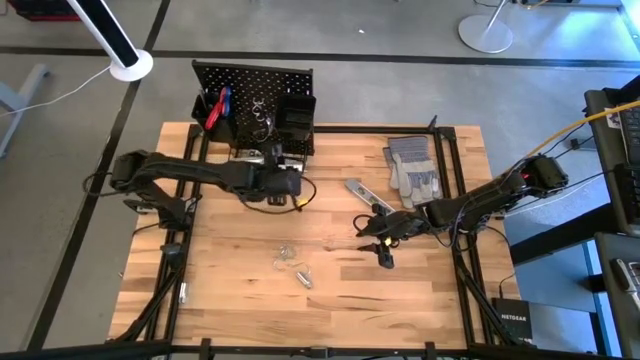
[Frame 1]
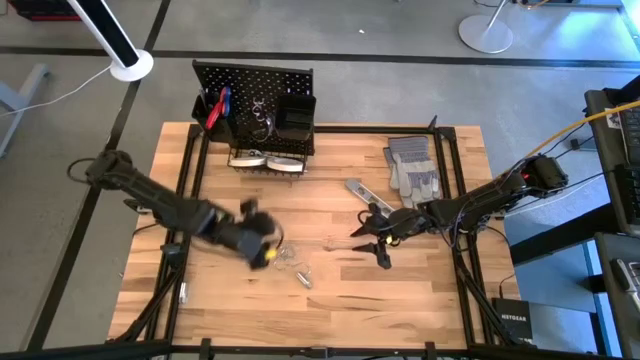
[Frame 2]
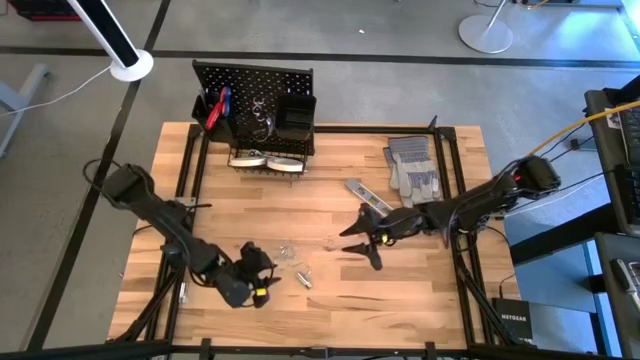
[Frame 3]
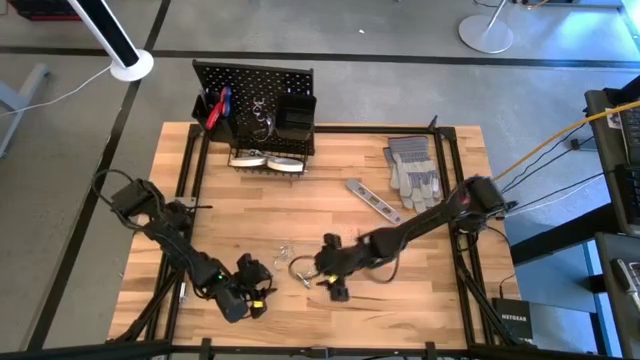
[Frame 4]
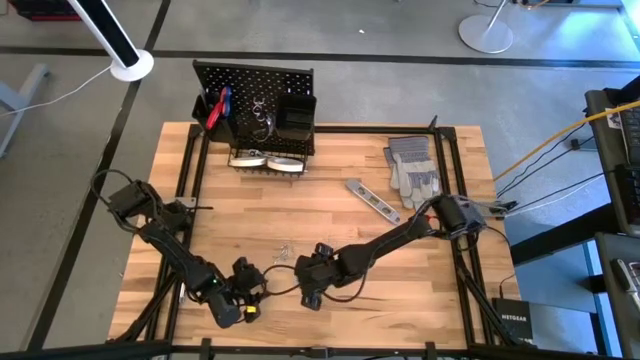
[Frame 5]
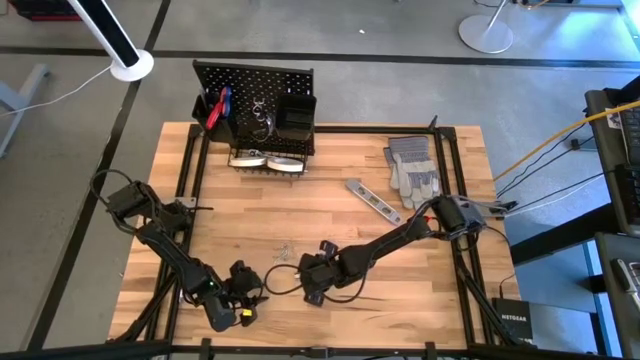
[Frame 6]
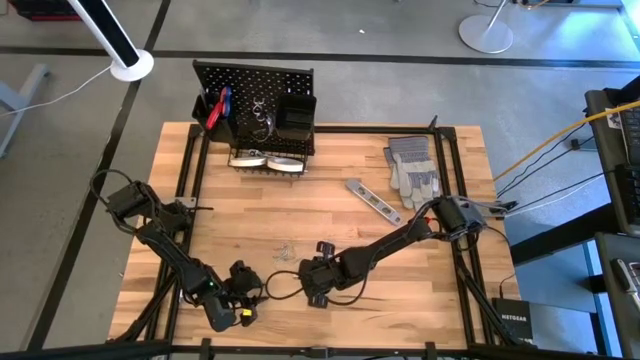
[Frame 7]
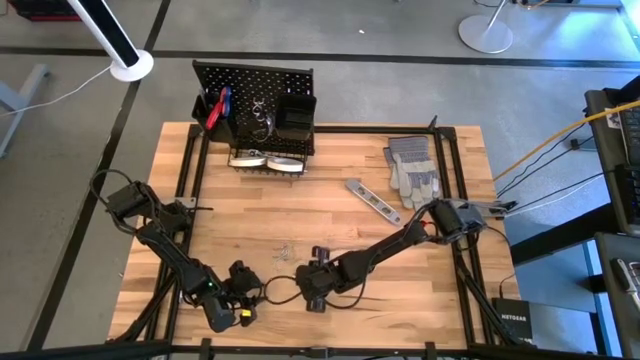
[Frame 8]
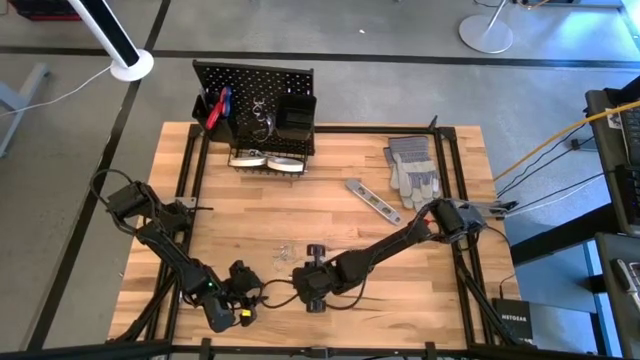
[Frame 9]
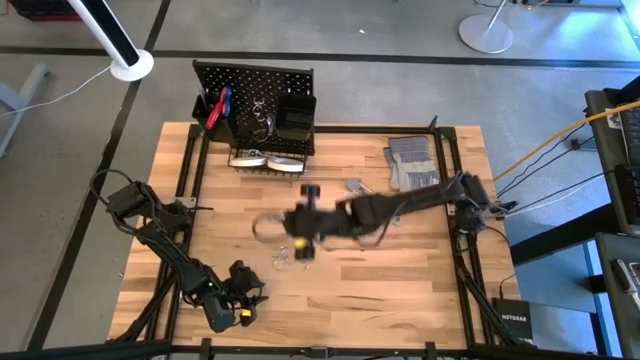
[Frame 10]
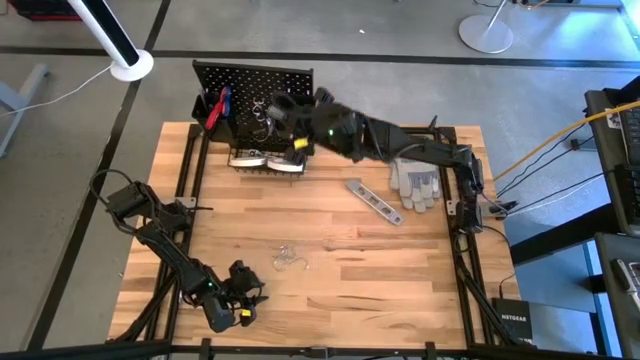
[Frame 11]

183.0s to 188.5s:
Task: Hang tools onto peg board
Put the silver socket into the right black bin on the pegboard

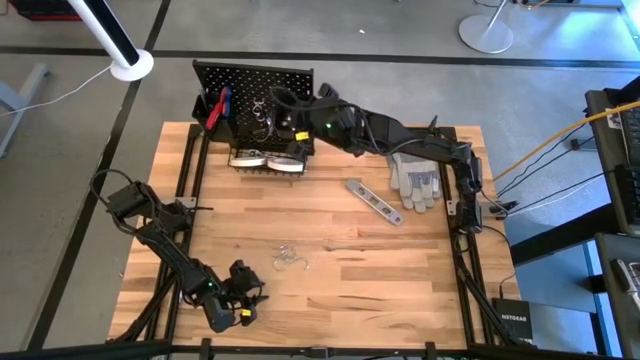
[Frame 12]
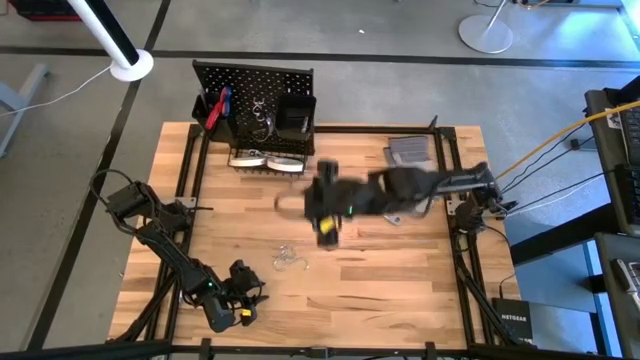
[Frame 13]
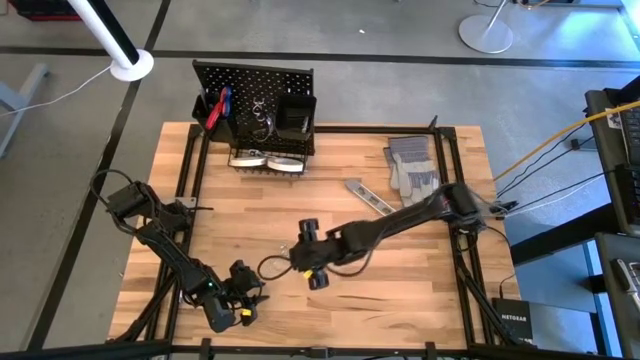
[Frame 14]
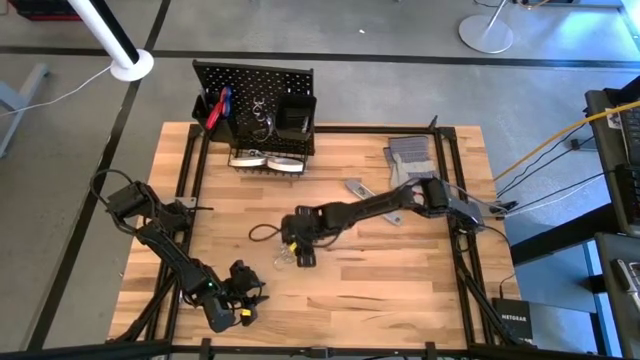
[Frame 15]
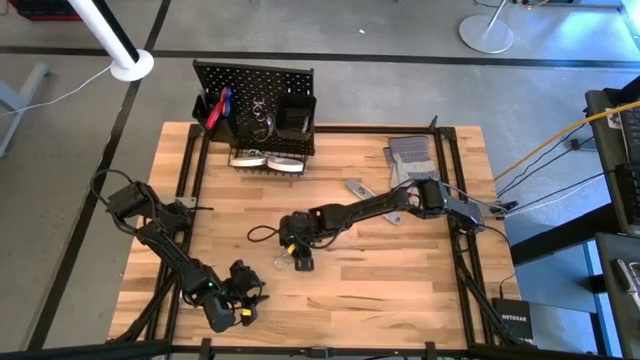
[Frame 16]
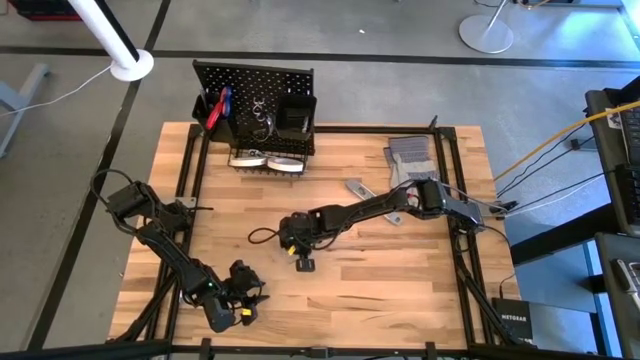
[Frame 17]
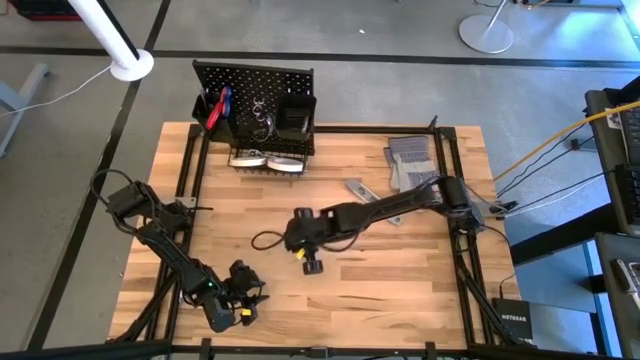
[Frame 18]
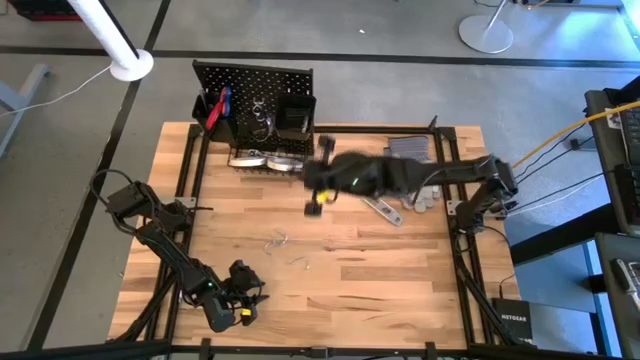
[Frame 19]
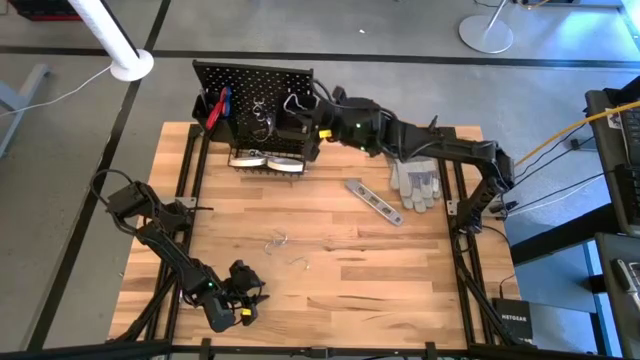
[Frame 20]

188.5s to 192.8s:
Put the silver binder clip into the right black bin on the pegboard

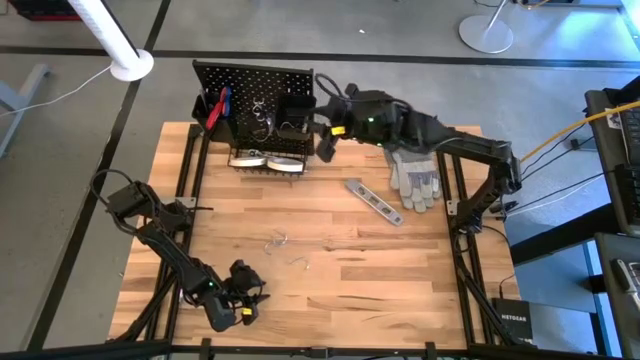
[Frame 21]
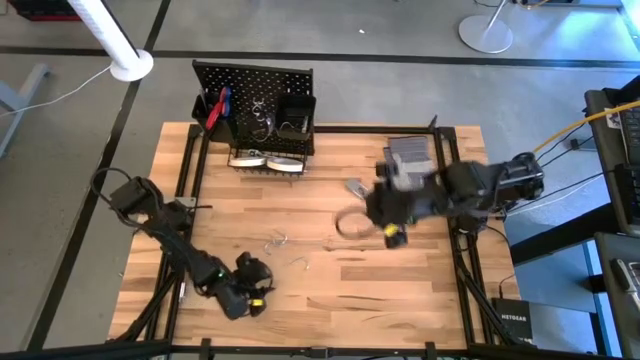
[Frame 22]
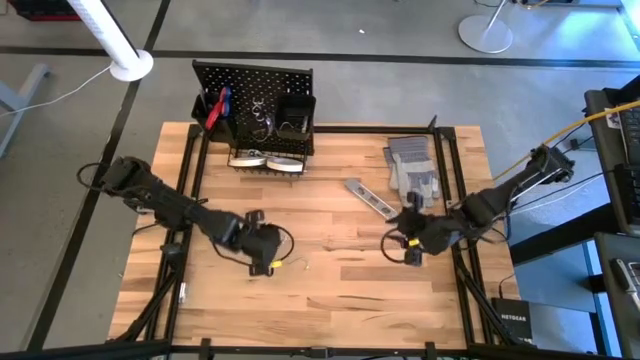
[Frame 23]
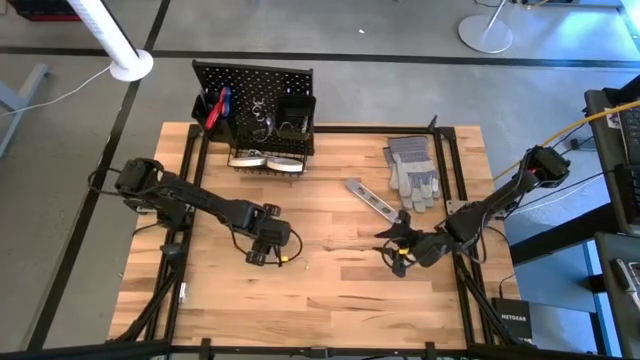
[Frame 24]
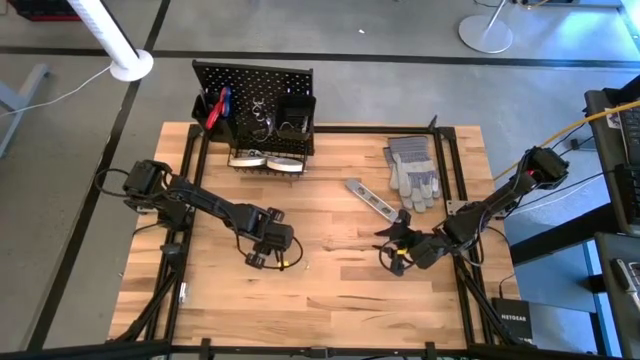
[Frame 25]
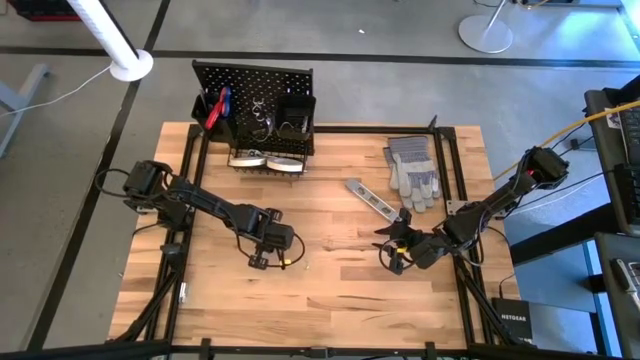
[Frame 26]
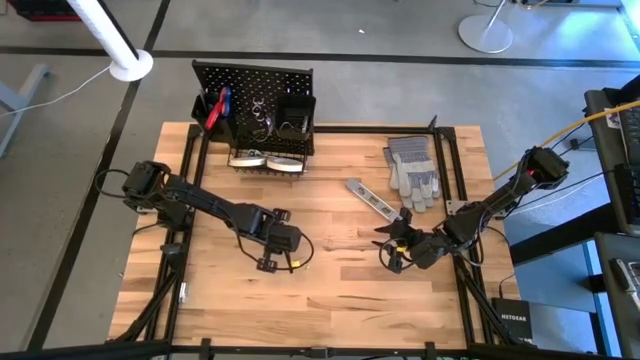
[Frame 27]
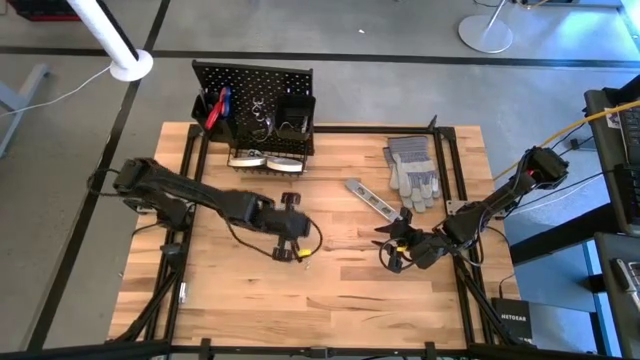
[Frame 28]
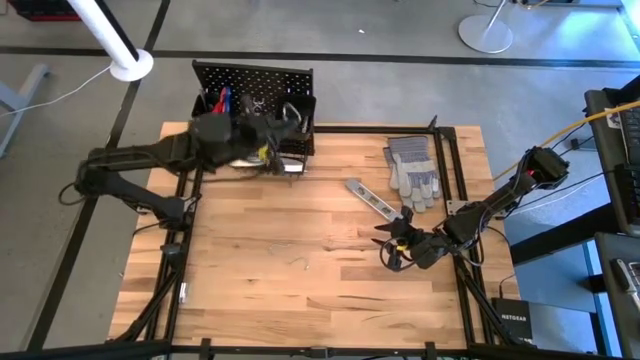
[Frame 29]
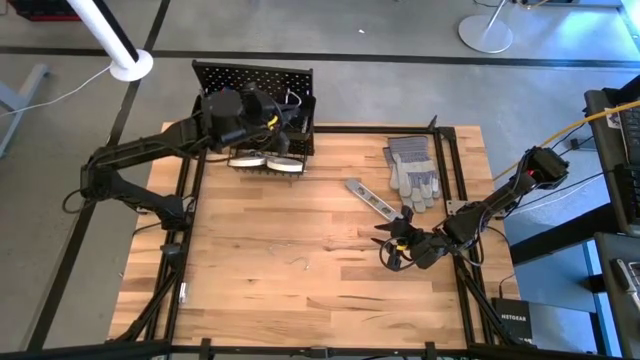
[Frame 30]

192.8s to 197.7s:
Put the binder clip into the right black bin on the pegboard

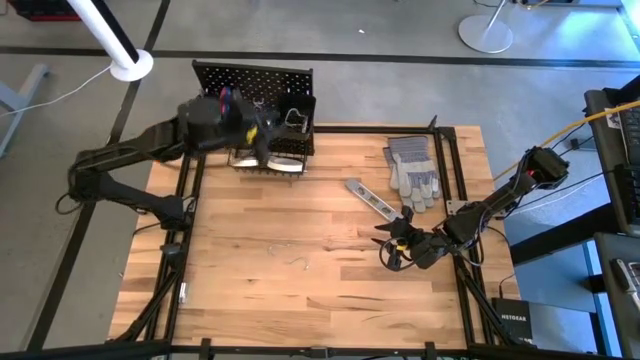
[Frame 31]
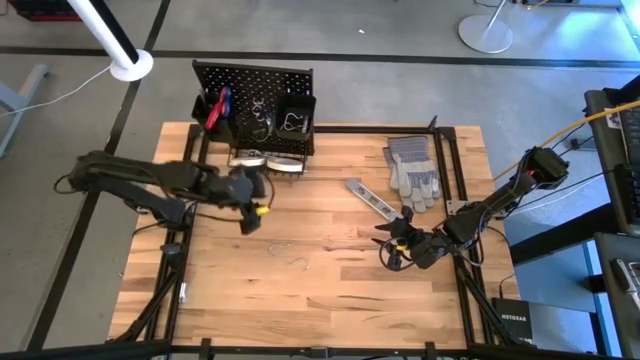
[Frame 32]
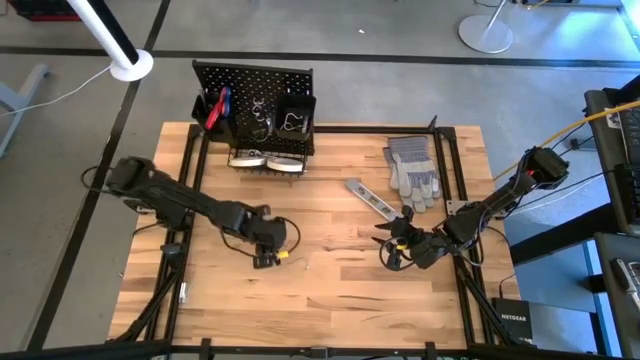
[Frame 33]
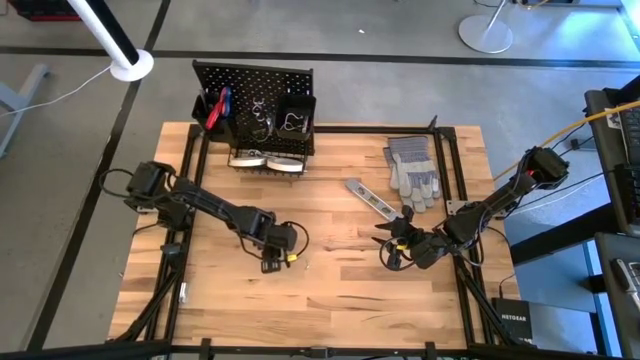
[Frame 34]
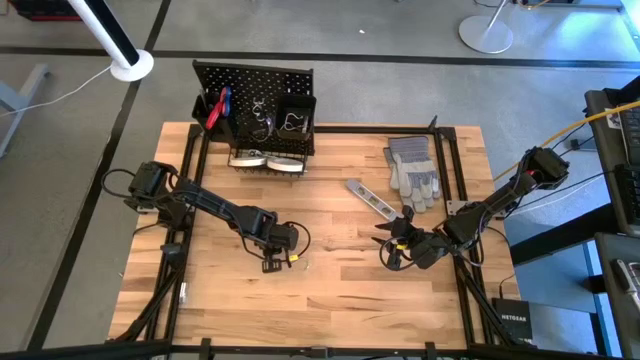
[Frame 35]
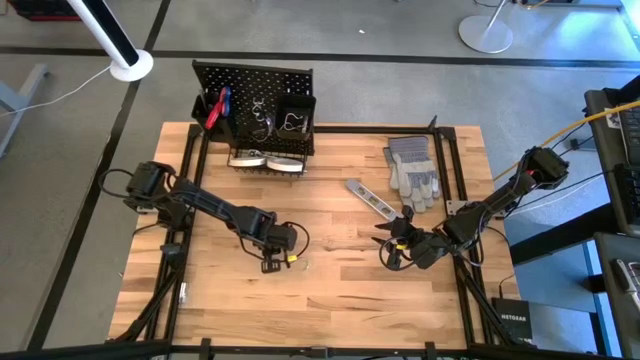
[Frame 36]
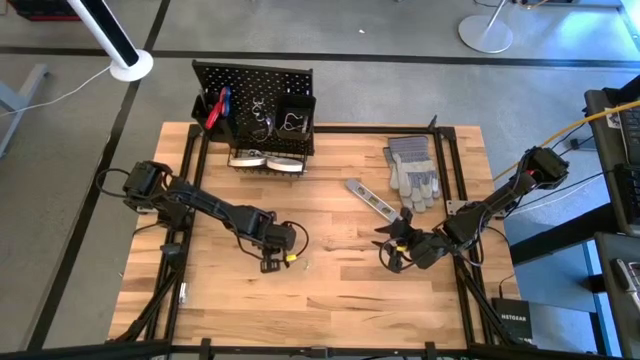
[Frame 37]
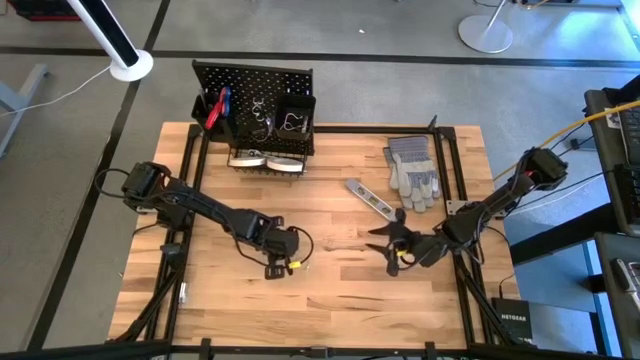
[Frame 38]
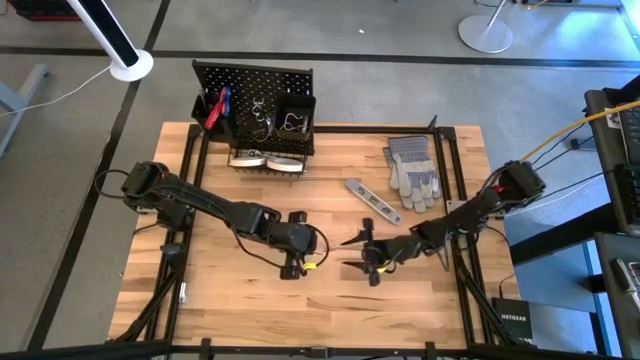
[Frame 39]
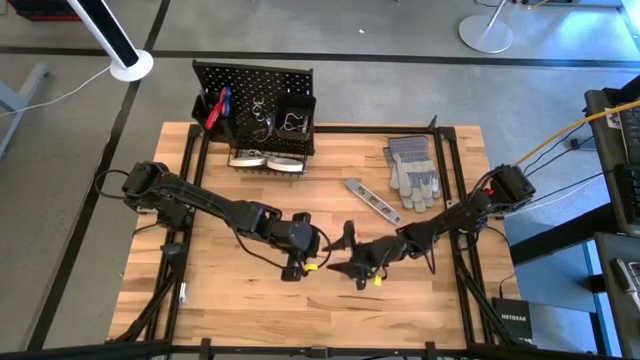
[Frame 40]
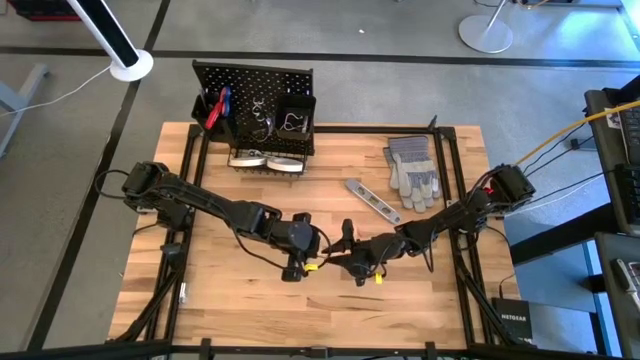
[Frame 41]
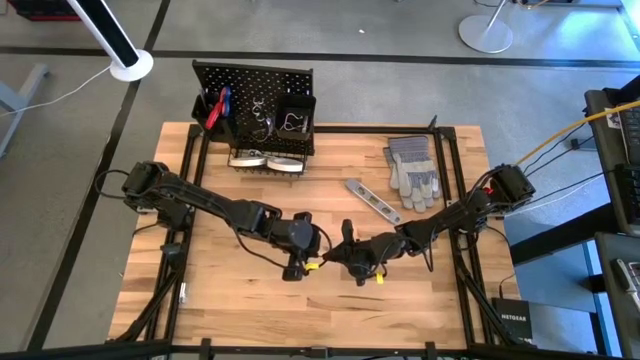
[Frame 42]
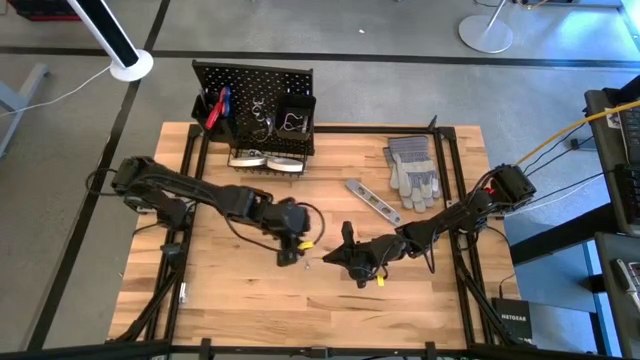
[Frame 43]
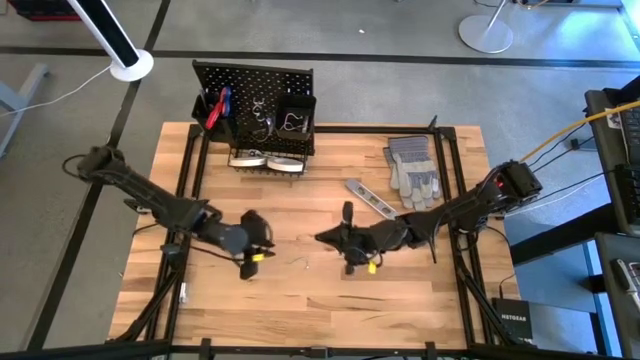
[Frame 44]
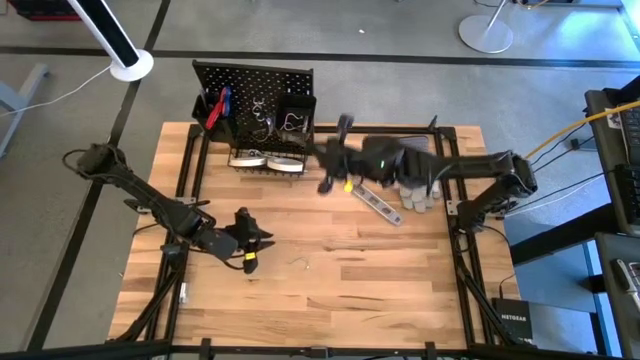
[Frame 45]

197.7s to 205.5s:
Put the silver hanger hook into the right black bin on the pegboard
